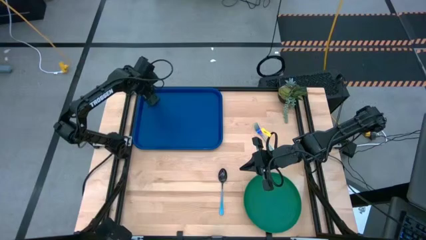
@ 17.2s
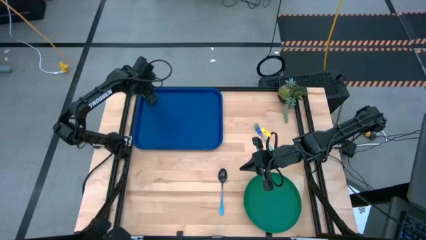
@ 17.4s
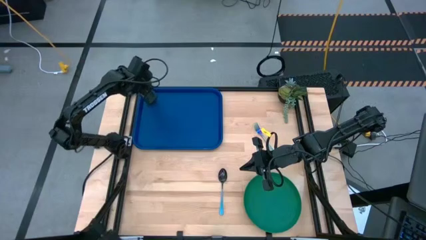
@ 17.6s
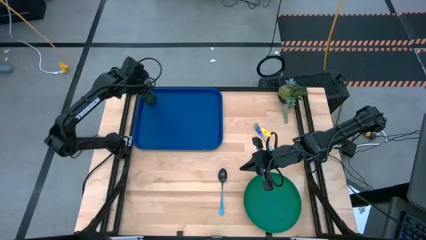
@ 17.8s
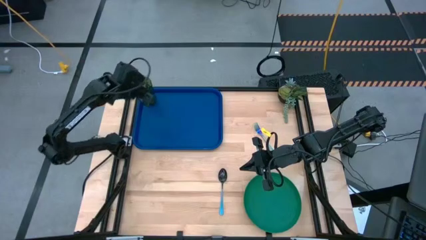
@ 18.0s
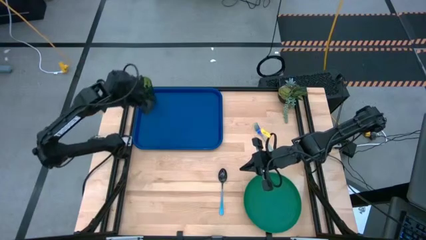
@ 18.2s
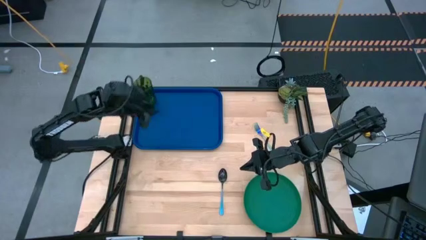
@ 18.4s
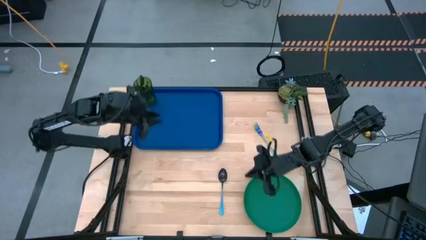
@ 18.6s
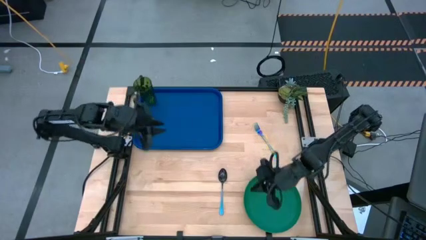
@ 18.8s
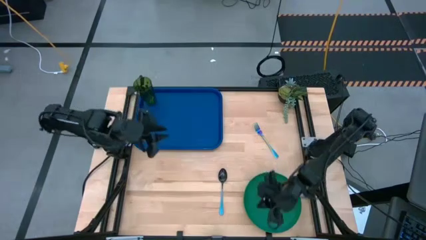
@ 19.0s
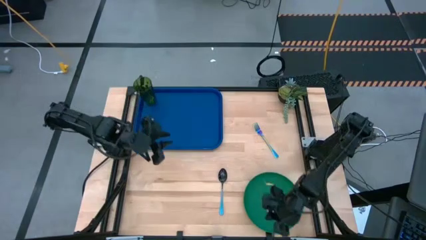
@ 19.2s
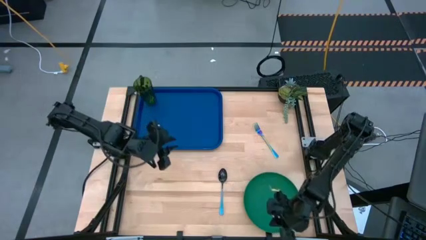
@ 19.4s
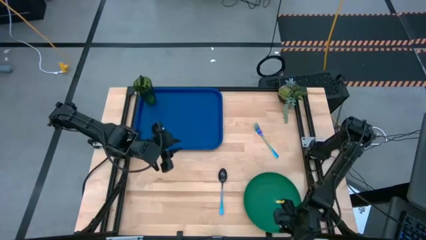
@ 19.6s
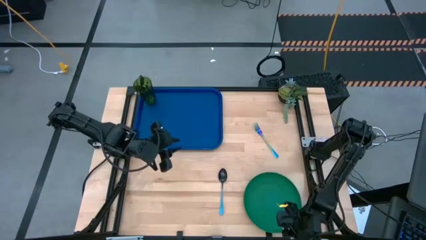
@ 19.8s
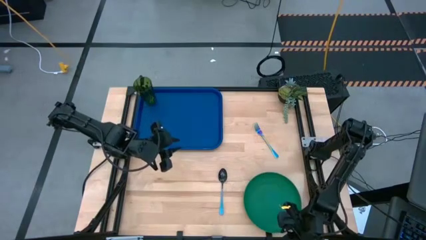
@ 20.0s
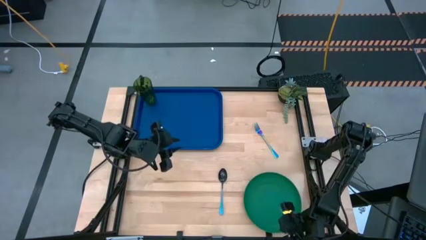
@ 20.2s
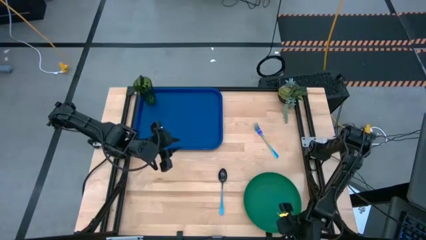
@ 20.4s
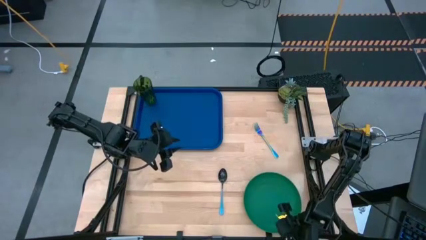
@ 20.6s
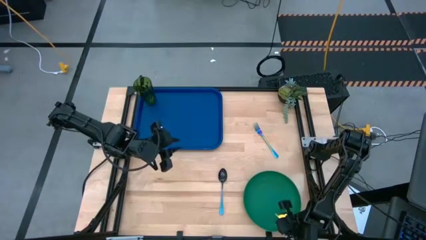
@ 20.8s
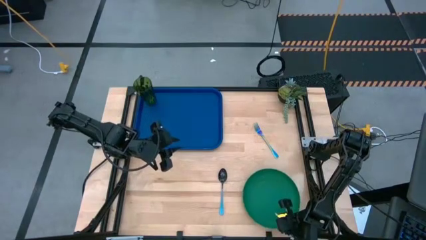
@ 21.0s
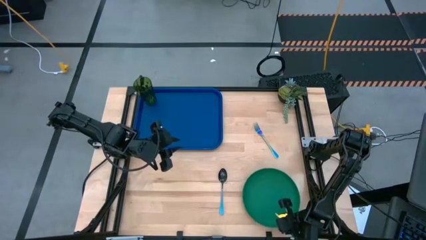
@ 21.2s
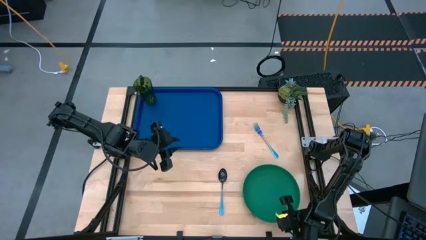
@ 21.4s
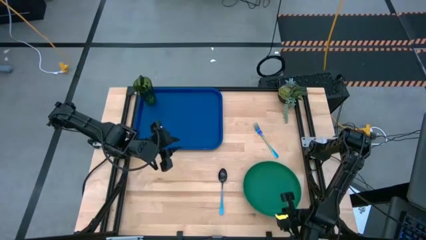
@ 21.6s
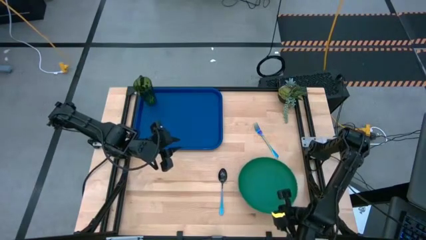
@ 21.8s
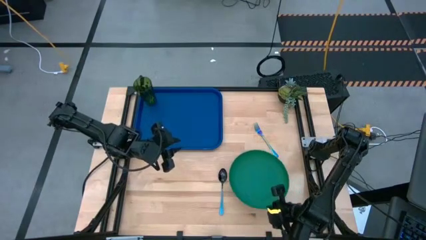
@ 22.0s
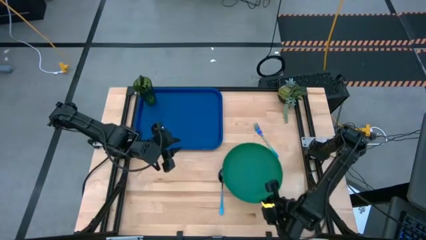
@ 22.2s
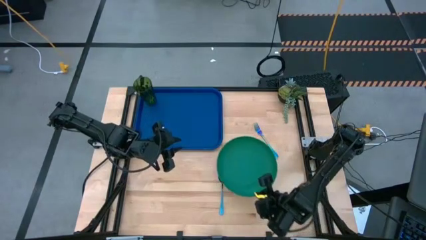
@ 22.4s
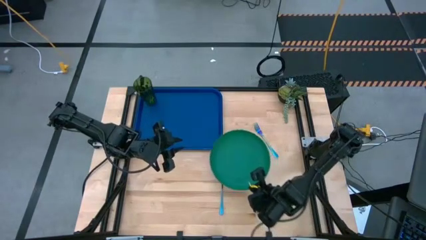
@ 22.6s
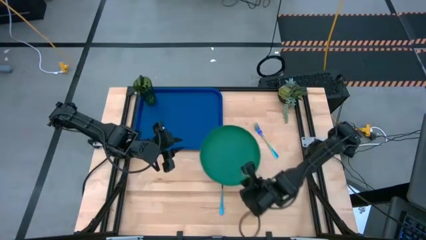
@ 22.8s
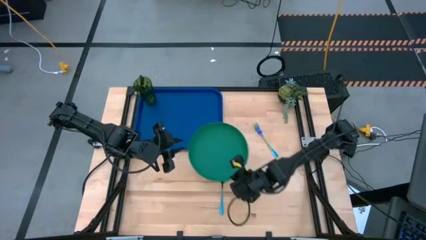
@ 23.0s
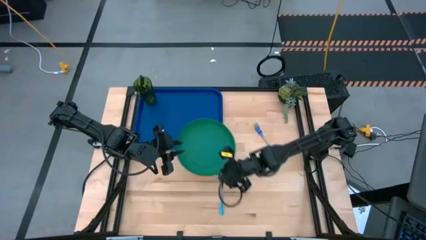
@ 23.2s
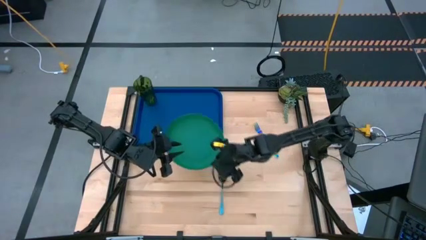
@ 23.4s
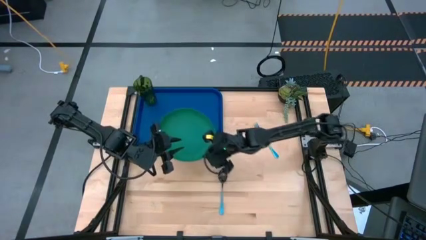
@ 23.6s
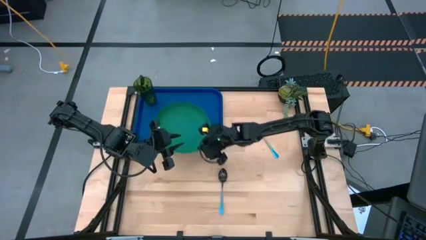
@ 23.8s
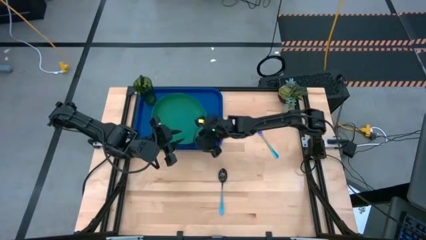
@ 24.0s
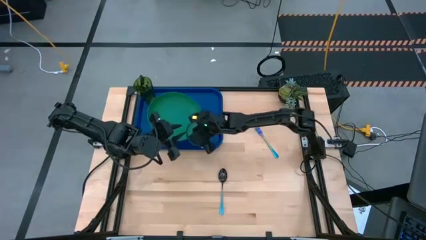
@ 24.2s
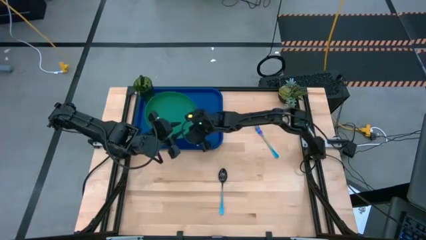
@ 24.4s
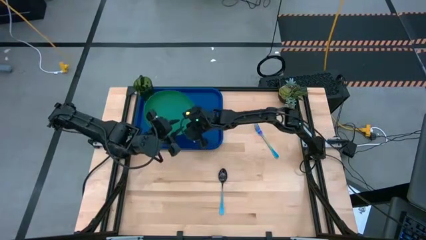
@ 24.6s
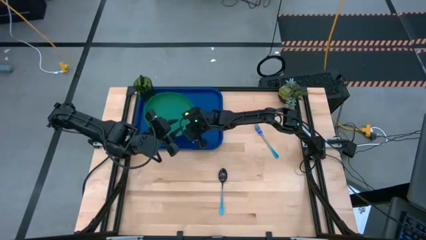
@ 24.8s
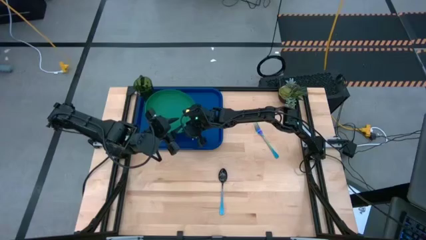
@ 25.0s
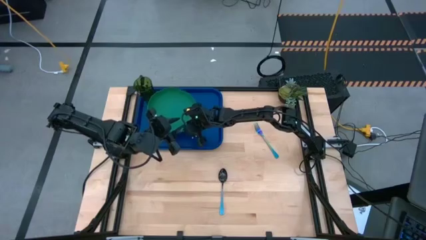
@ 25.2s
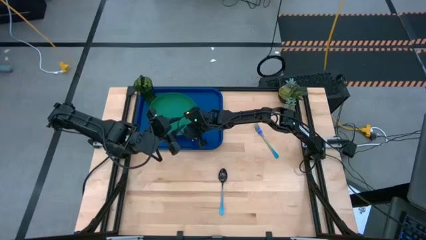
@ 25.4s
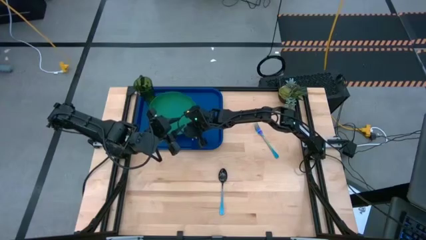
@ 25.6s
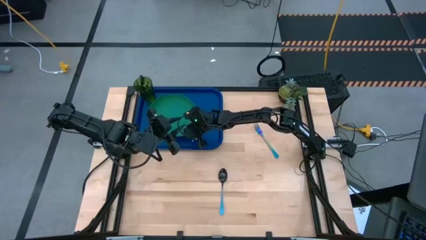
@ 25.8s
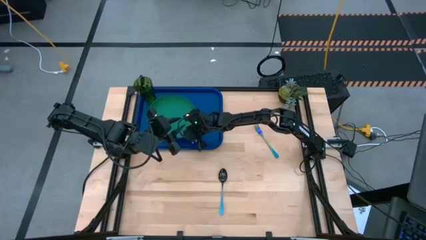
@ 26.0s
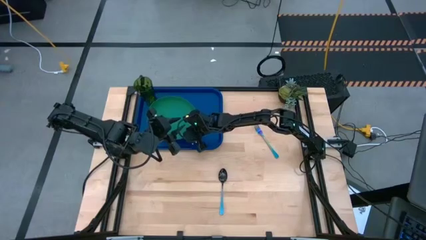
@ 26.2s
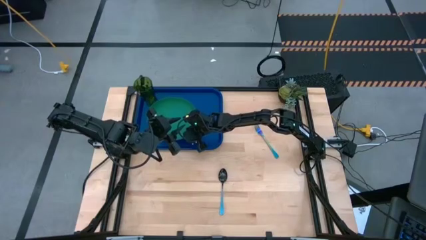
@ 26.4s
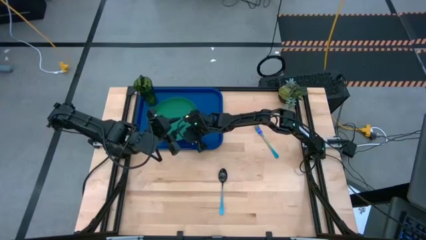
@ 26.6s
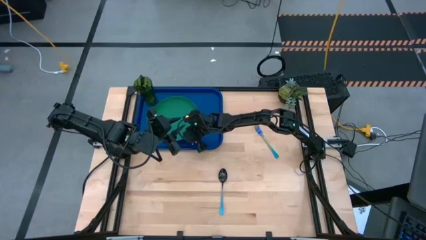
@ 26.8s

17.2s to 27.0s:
Task: Pick and place plate/cup/fork/spoon on tray
Put the green plate on the blue food tray
